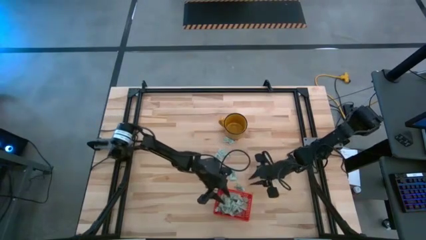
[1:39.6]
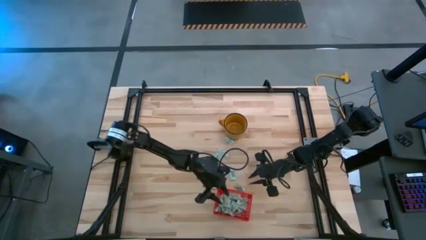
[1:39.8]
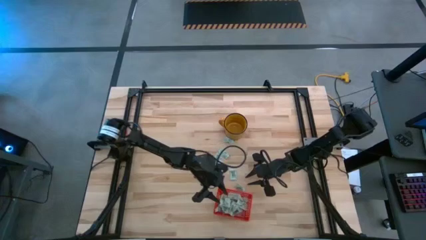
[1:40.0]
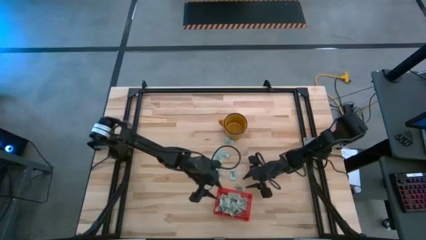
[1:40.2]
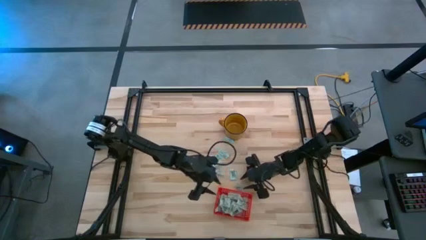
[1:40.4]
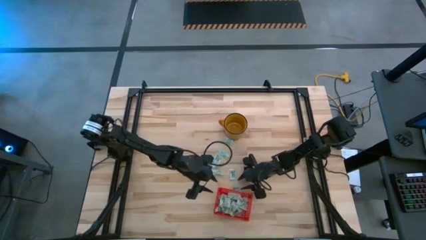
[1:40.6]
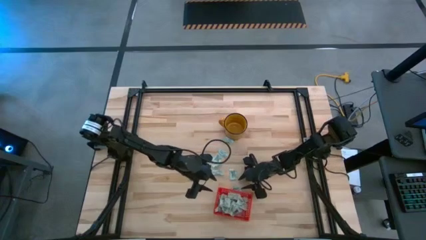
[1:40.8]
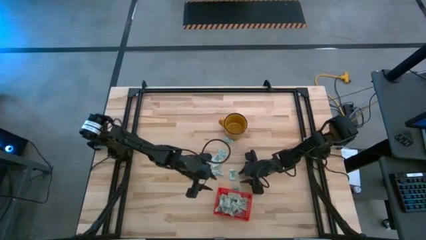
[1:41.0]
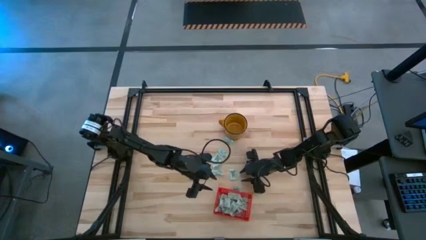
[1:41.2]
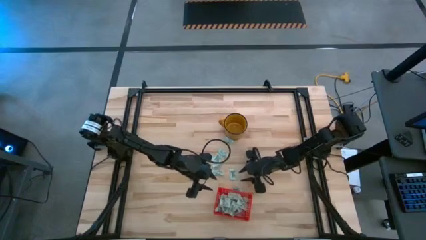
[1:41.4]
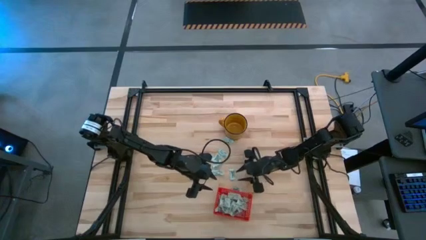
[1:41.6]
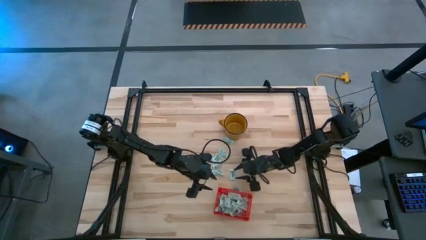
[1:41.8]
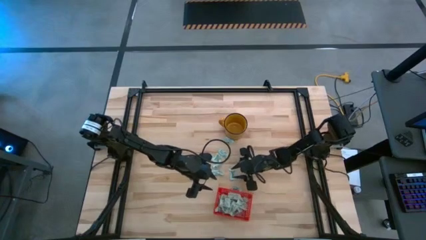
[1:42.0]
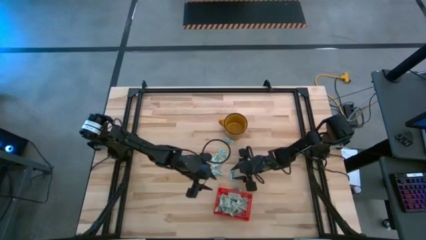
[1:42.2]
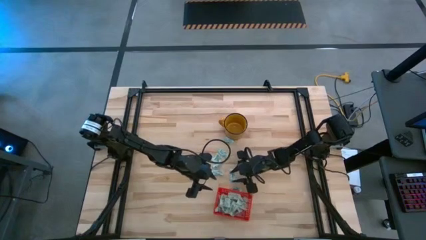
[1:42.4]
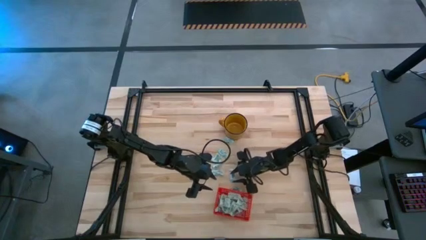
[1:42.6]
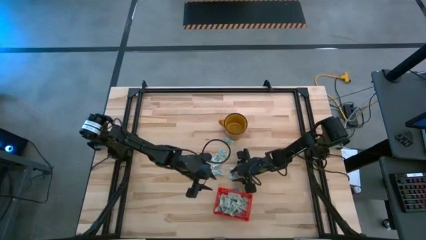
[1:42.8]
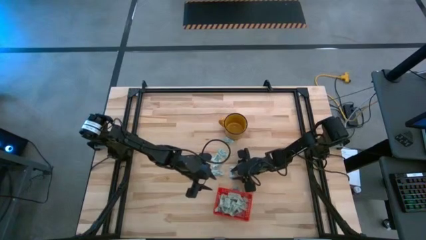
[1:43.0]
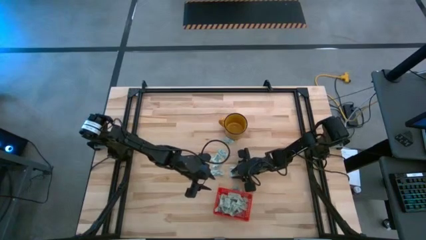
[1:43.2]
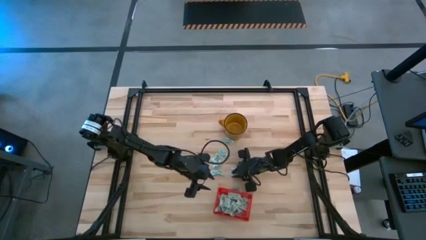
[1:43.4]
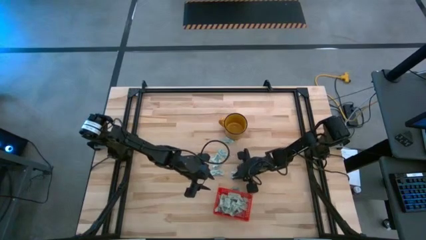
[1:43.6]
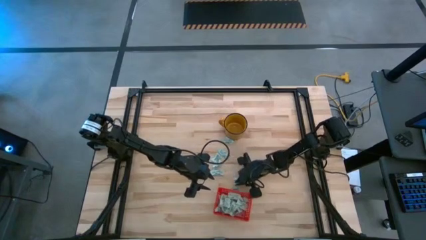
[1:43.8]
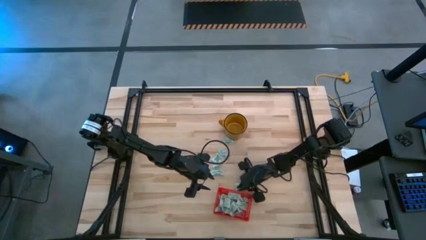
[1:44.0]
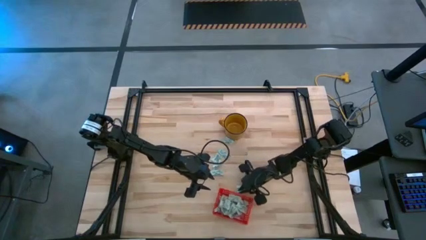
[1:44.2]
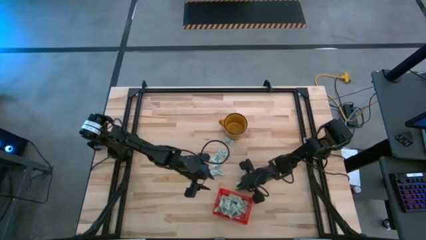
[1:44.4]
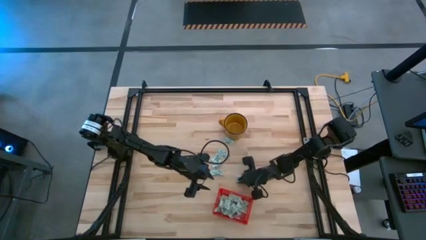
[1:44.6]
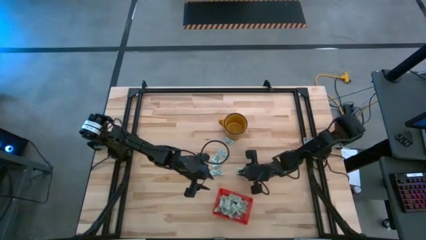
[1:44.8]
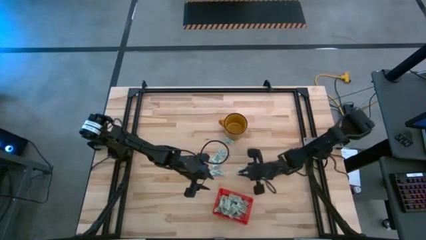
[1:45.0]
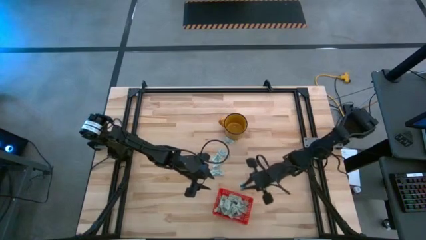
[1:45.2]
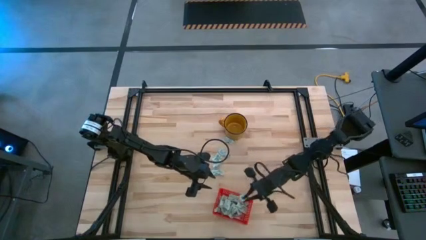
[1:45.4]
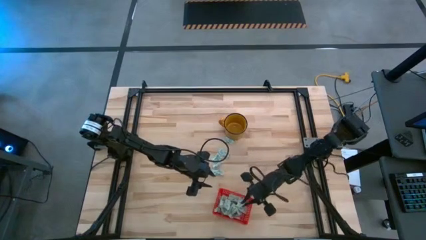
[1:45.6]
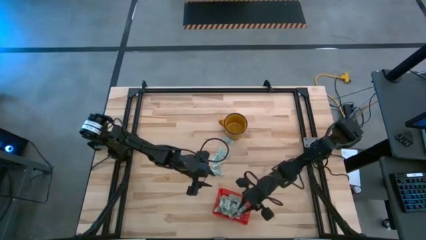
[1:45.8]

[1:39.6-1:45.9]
Task: Pick and place Stevia / Truvia into bins
Put the stevia packet into the bin

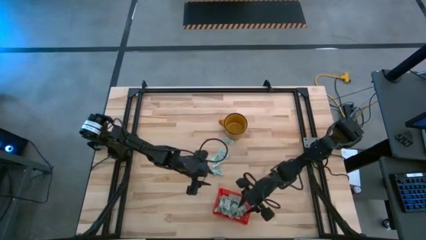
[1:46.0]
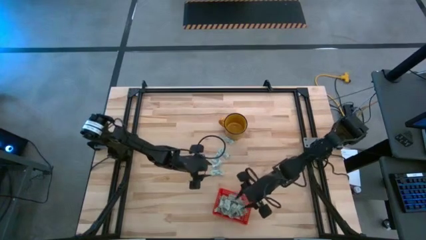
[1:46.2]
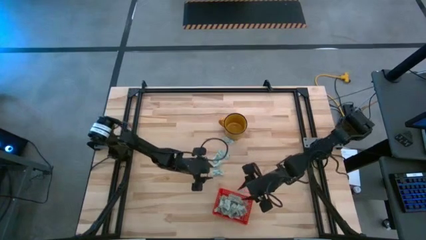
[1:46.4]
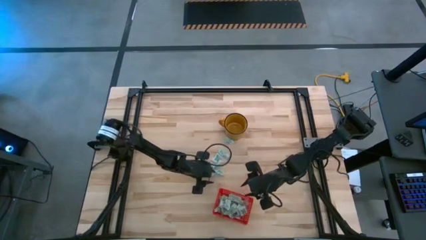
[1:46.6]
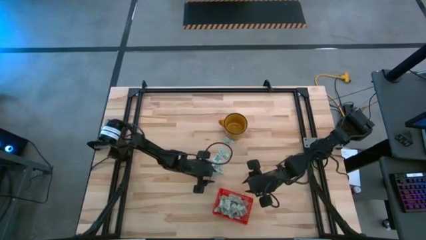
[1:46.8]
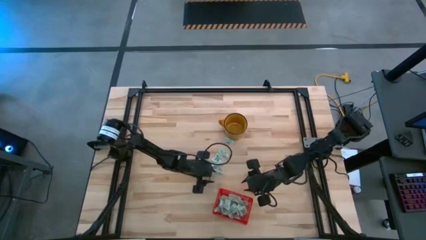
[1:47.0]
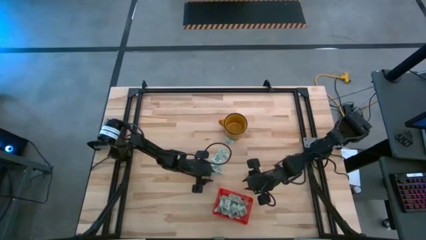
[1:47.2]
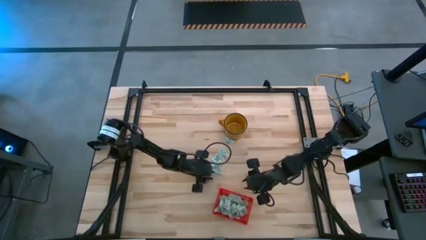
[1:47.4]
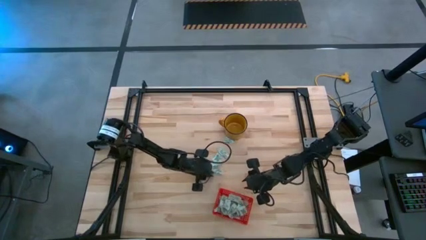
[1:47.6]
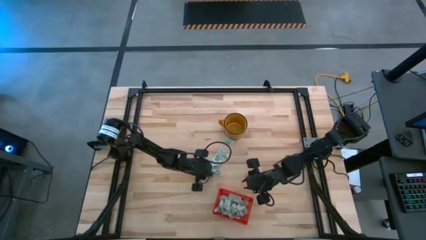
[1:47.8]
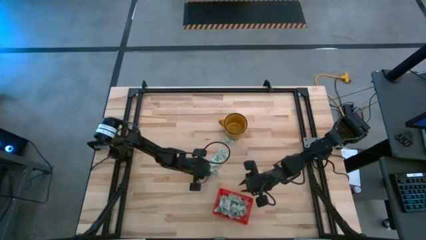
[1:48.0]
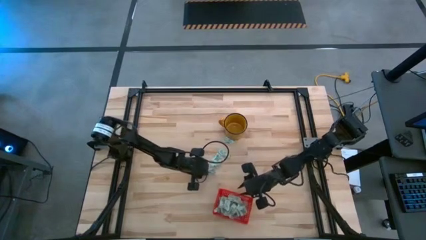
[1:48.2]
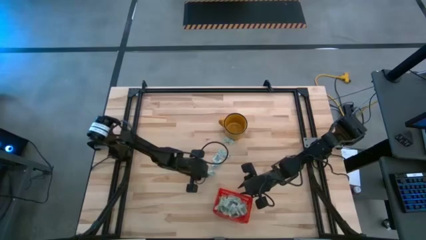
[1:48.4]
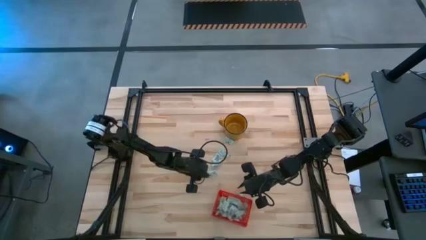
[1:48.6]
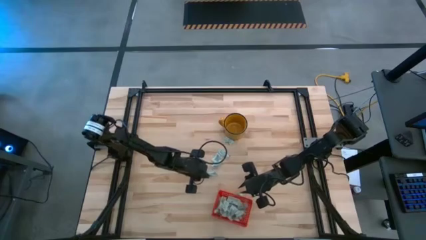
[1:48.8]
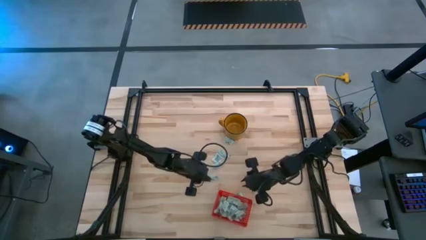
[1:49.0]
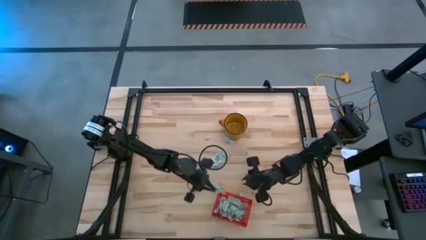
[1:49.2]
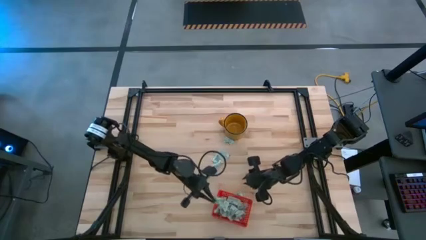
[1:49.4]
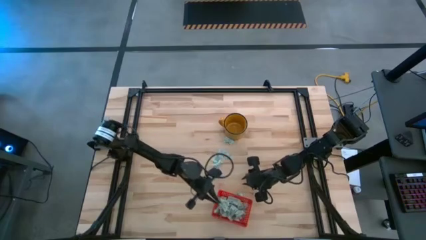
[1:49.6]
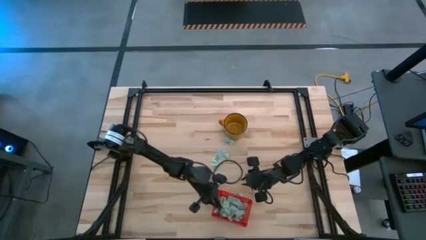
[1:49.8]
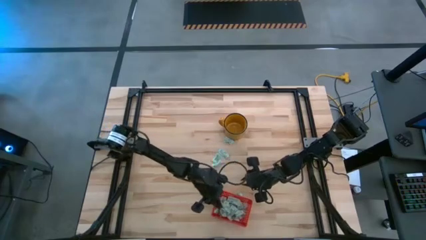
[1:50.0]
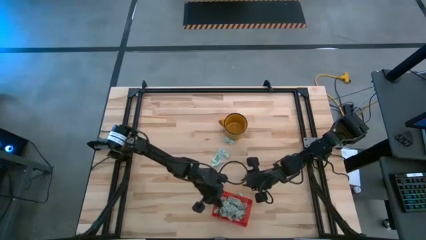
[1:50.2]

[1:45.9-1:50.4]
Put the stevia packet into the bin

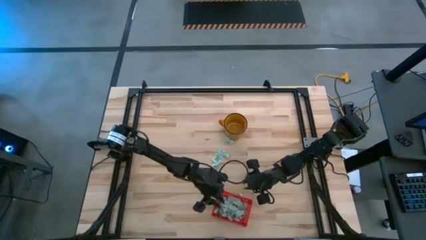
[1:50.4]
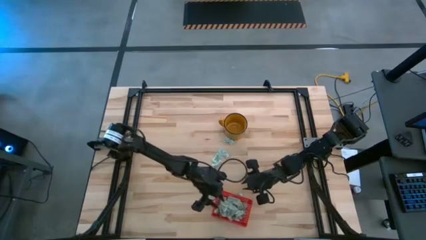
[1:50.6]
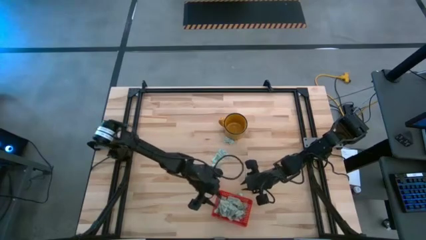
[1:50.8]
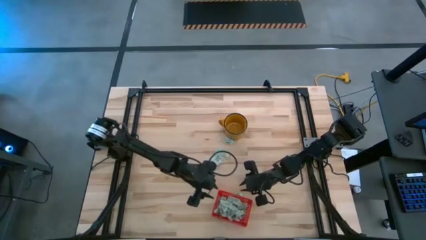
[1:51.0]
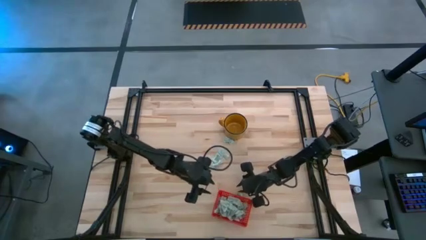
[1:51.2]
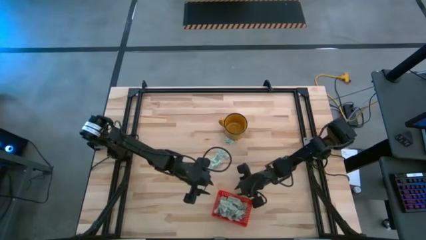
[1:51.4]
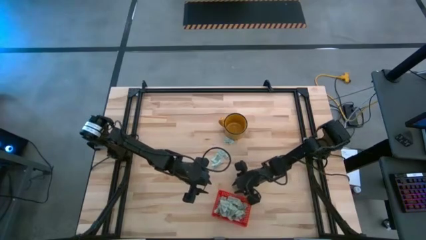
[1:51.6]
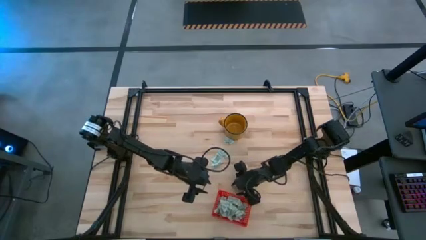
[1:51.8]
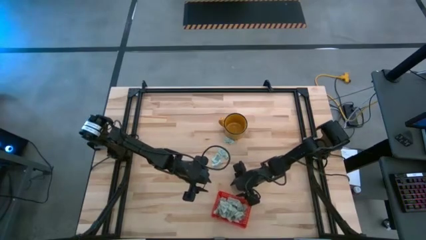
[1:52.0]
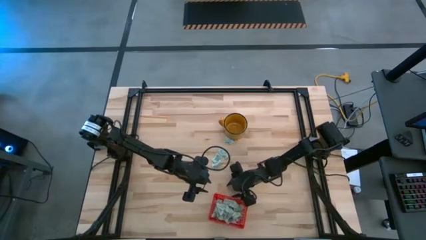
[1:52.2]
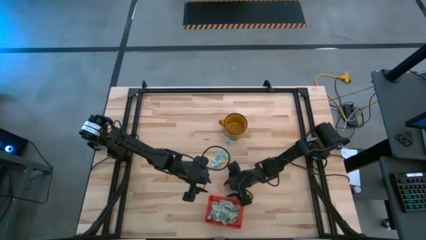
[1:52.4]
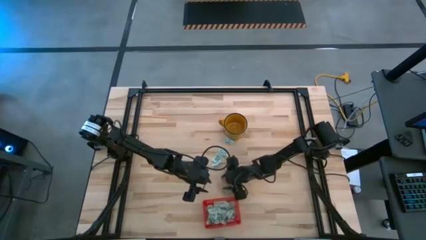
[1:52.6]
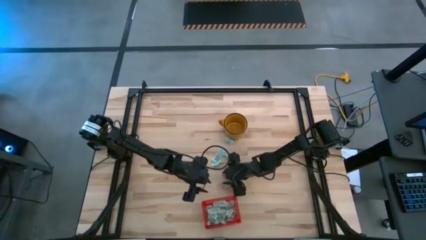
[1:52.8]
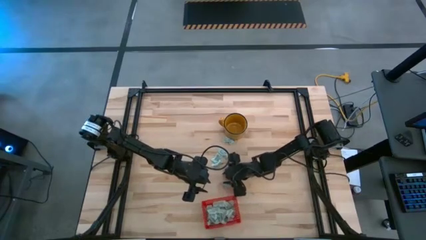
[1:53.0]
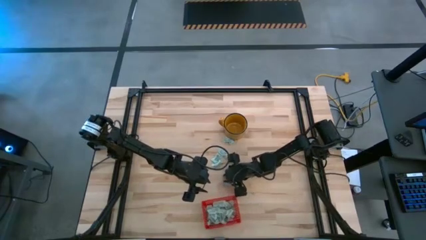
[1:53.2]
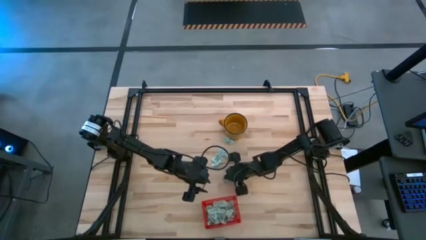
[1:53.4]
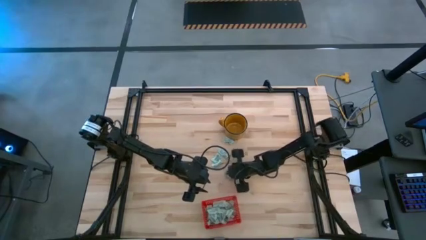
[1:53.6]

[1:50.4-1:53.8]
Put the stevia packet into the bin

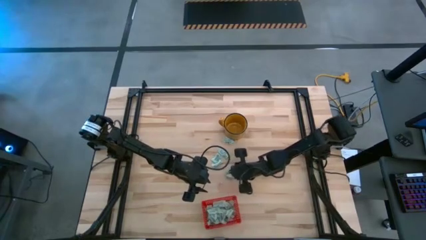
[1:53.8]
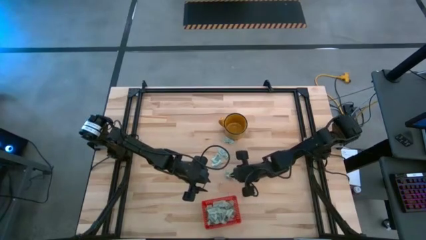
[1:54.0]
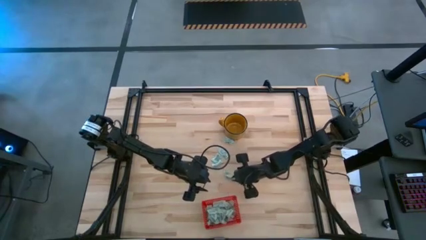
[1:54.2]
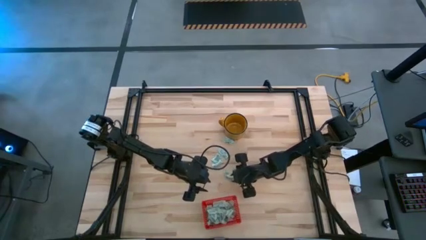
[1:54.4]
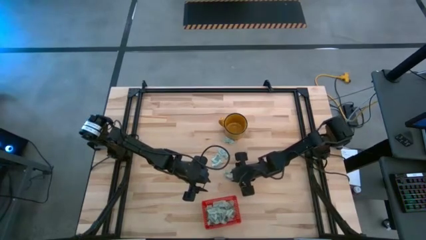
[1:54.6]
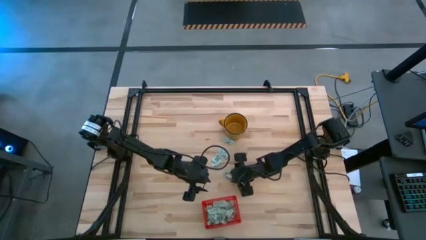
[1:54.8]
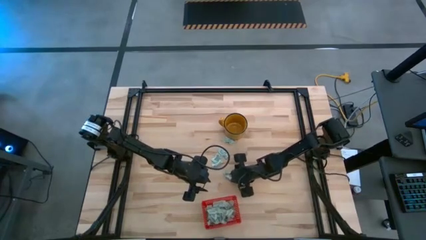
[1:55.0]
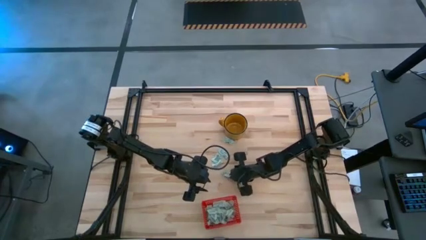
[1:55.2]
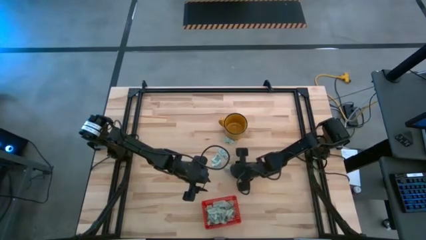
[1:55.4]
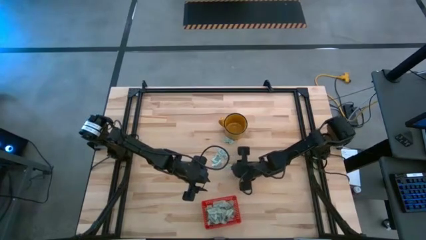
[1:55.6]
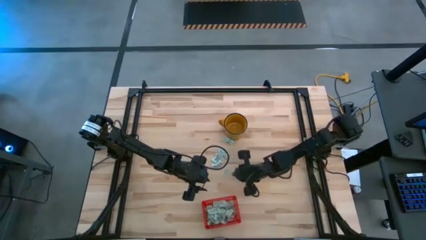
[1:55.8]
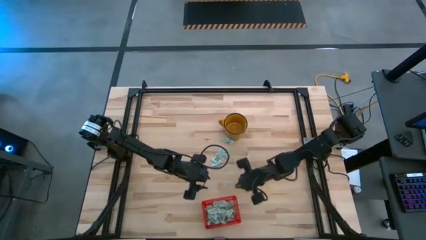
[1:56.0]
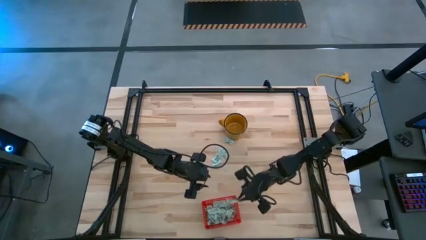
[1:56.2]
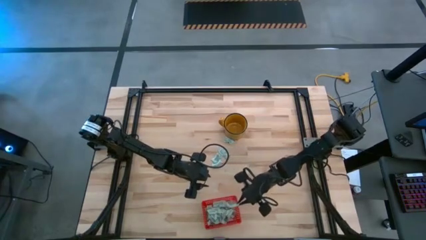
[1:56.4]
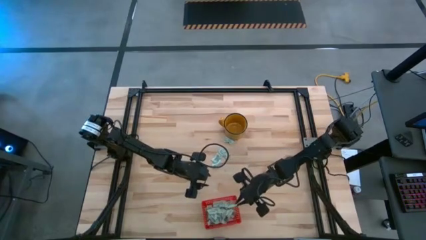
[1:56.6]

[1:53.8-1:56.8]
Put the stevia packet into the bin
